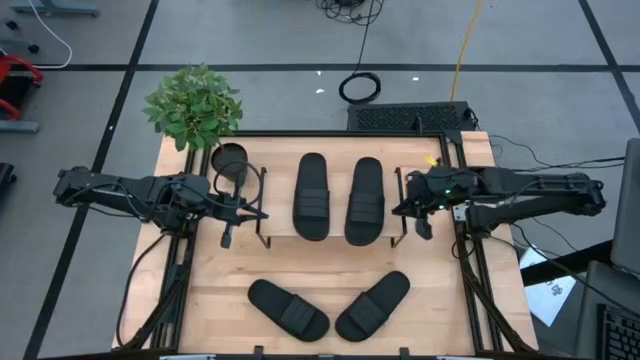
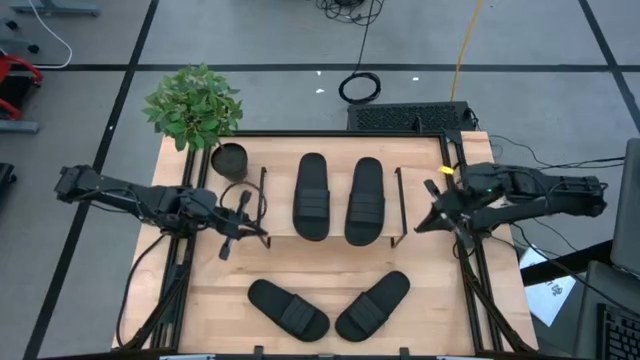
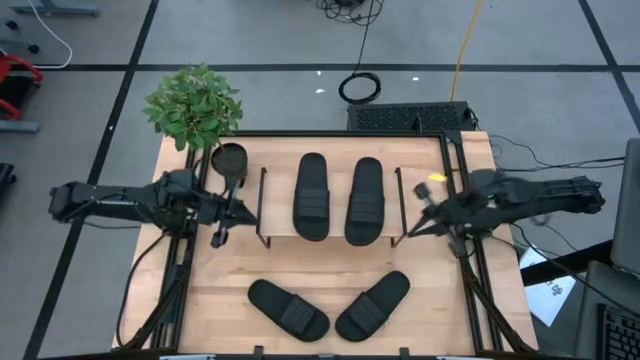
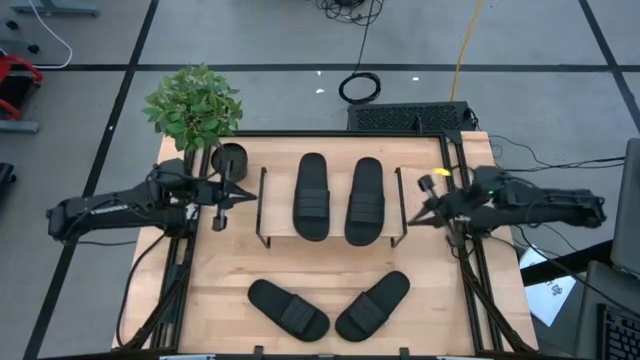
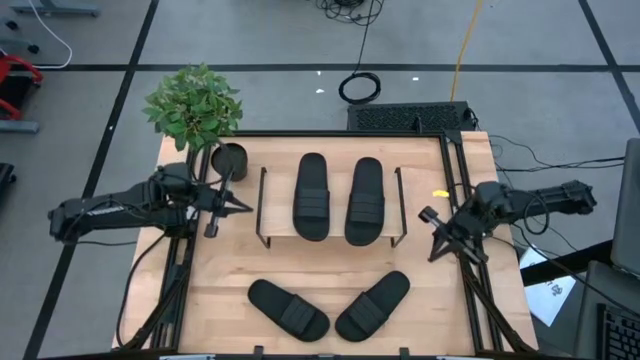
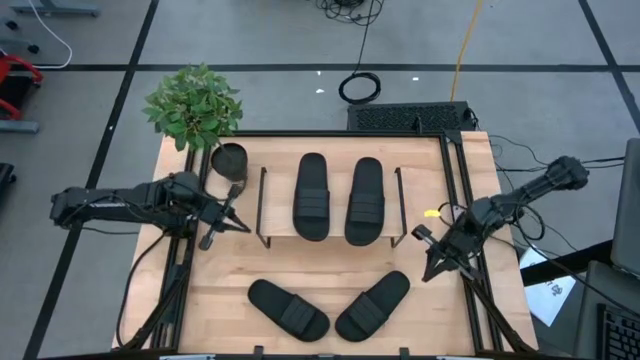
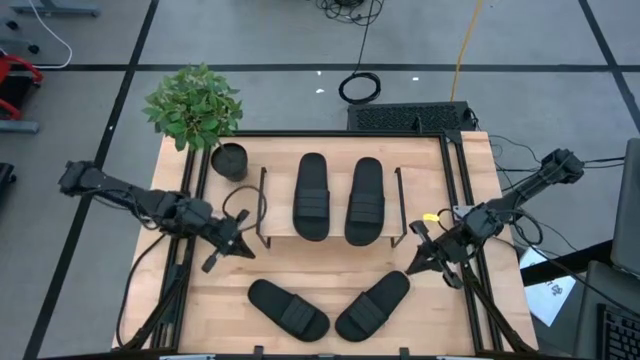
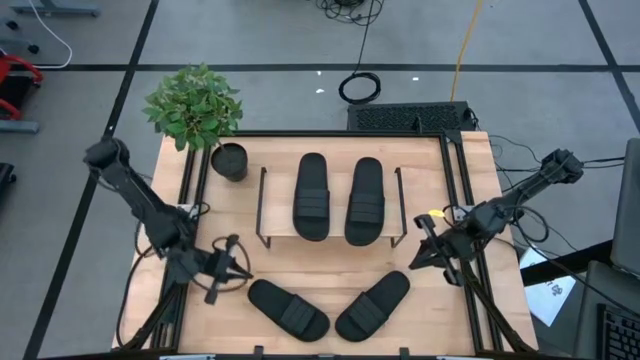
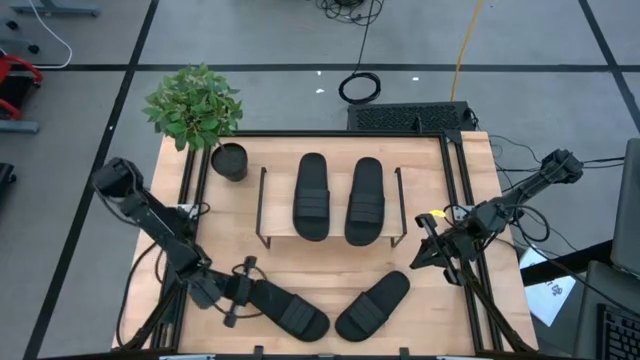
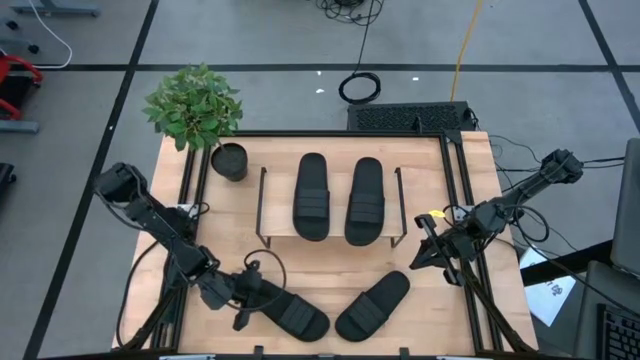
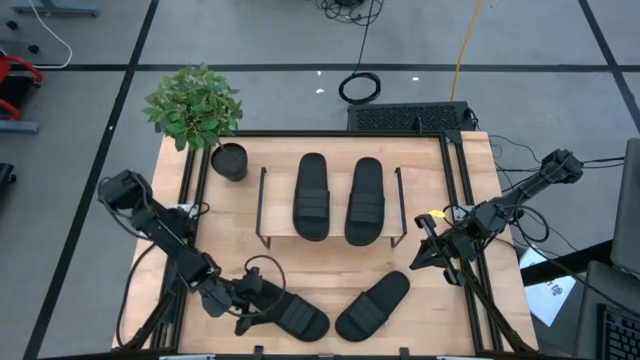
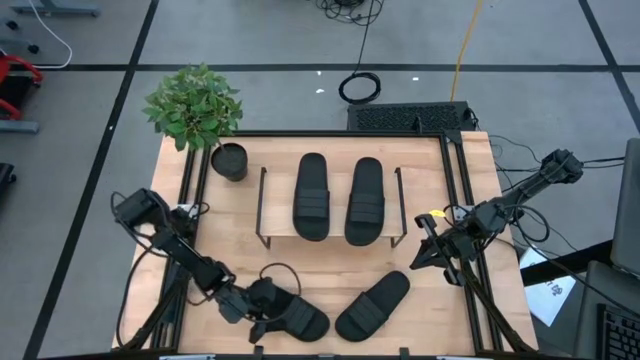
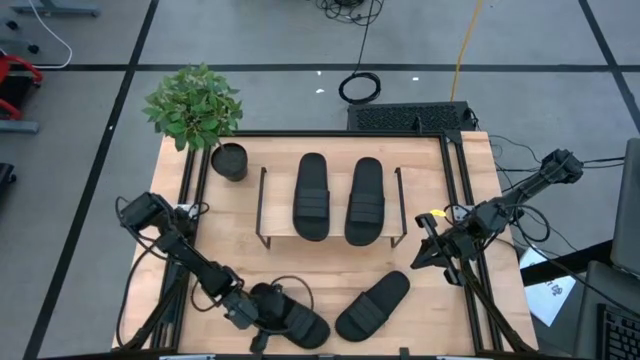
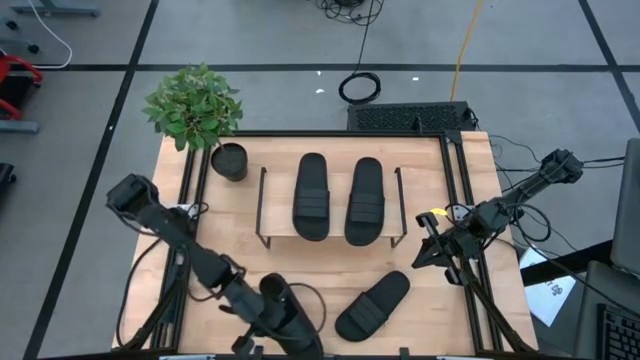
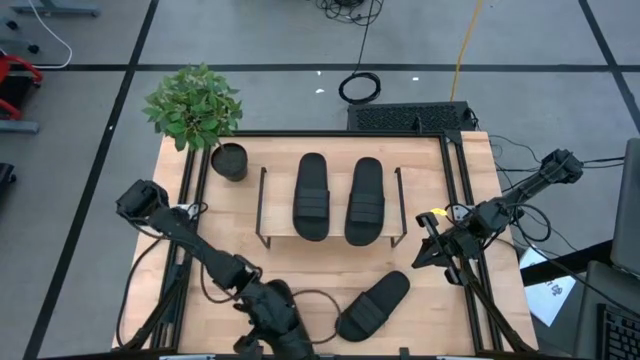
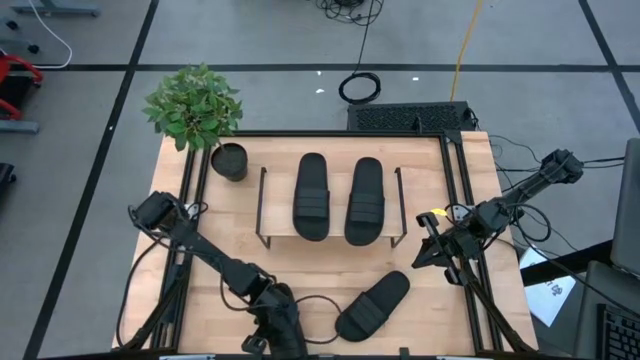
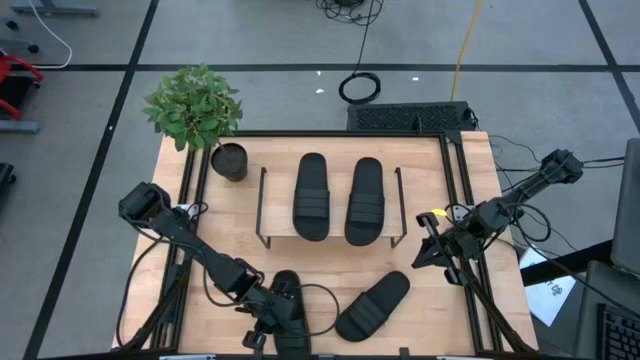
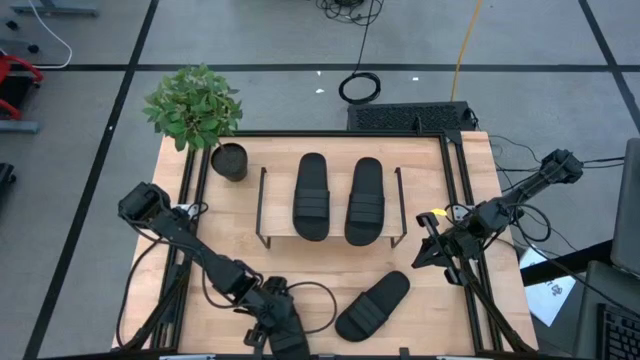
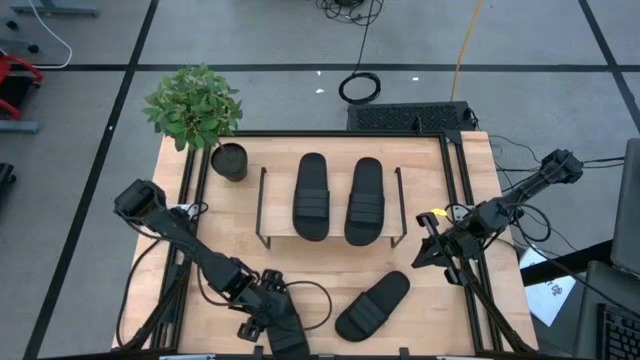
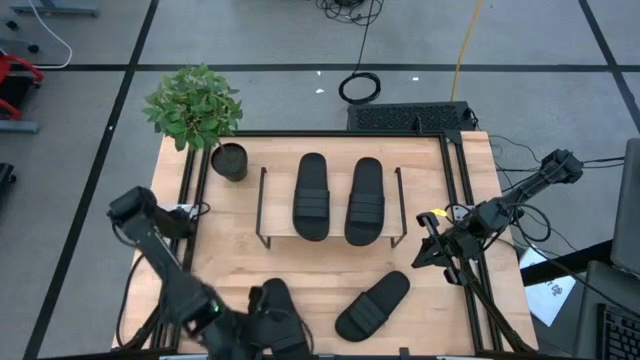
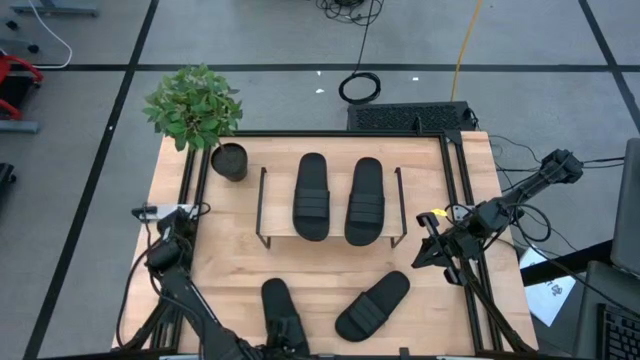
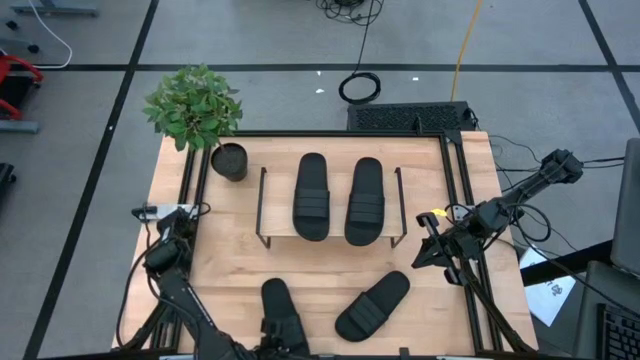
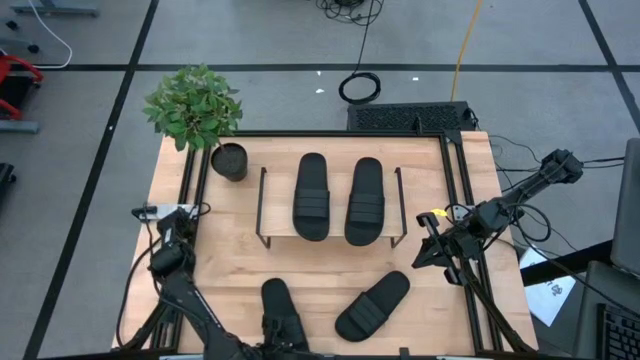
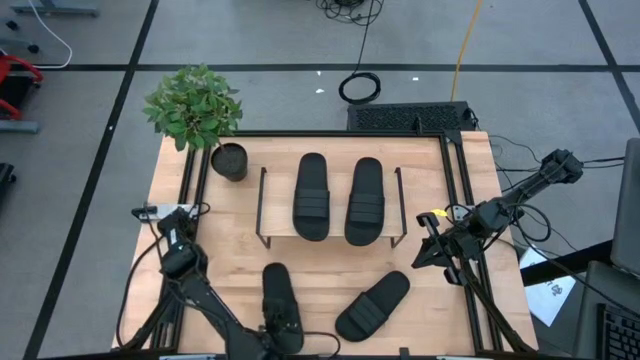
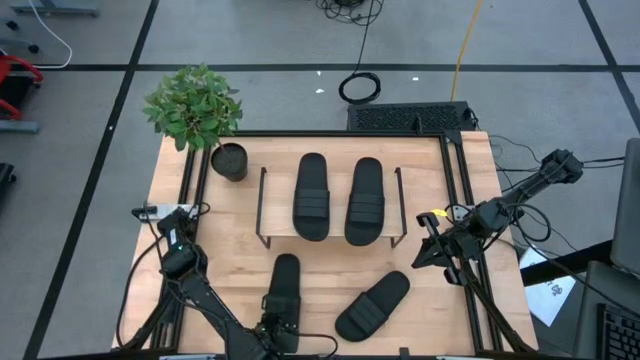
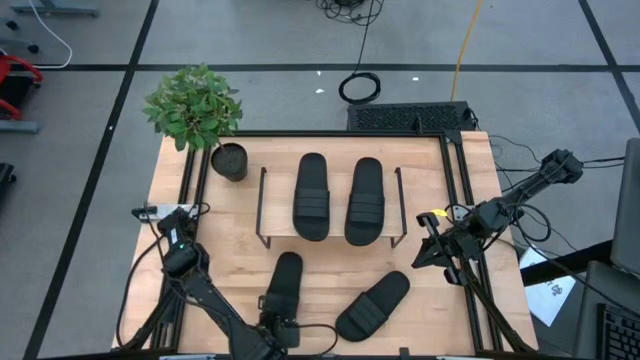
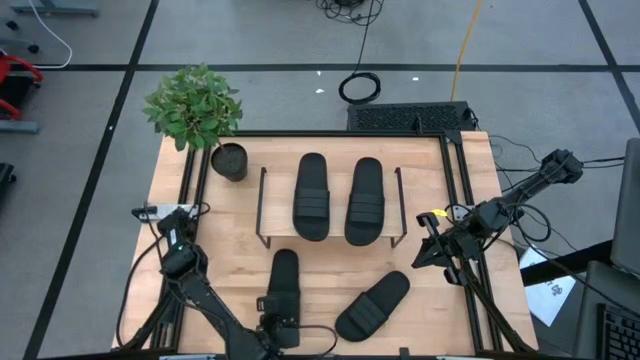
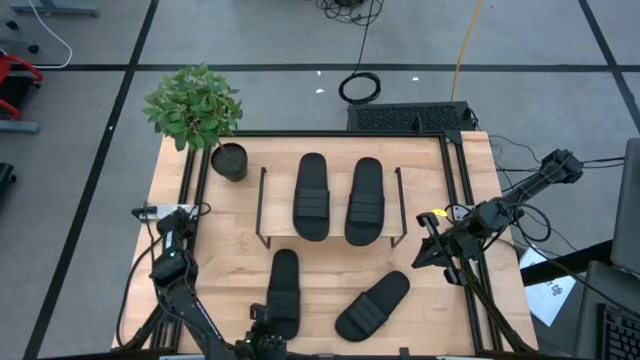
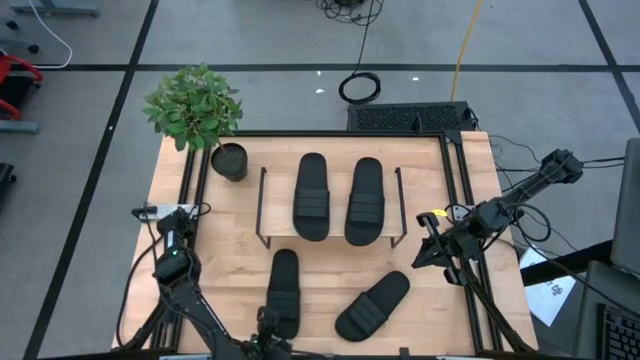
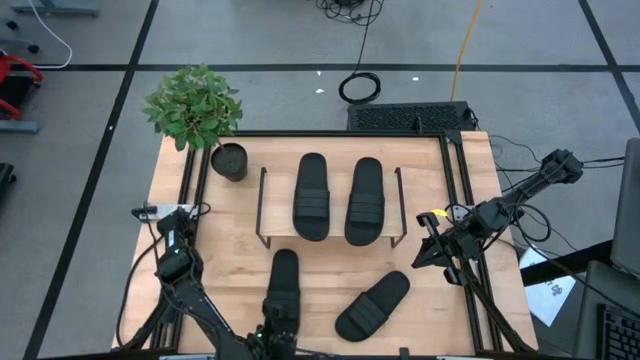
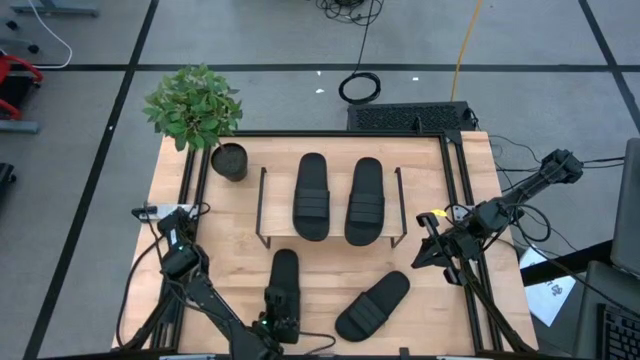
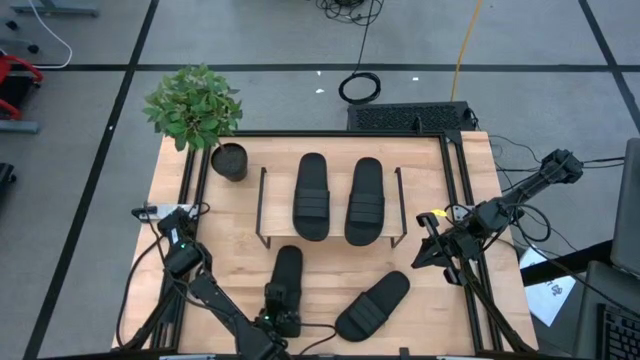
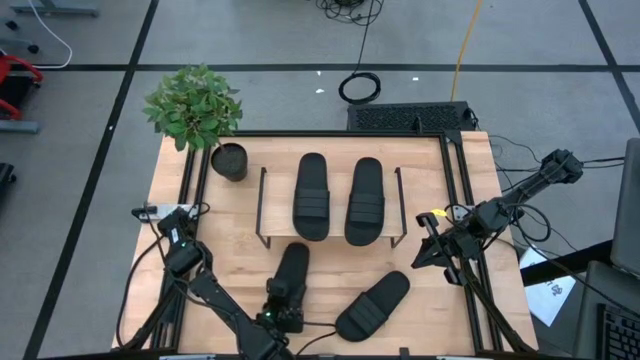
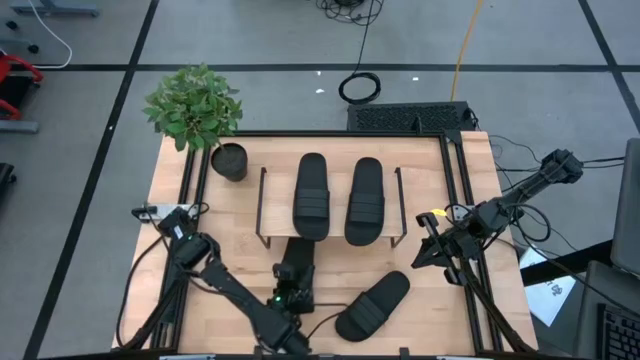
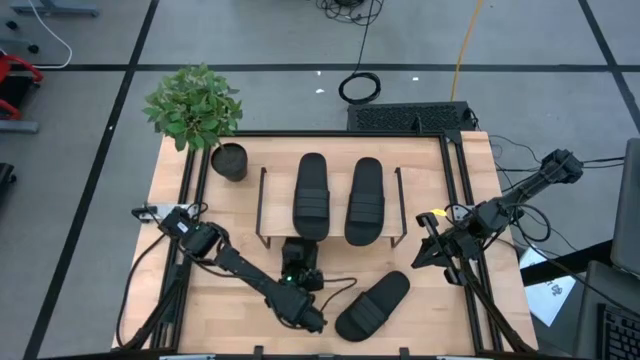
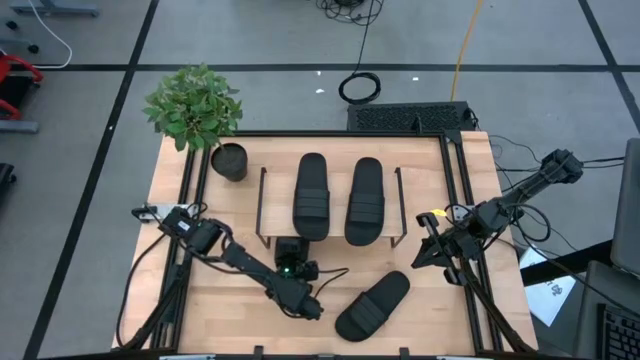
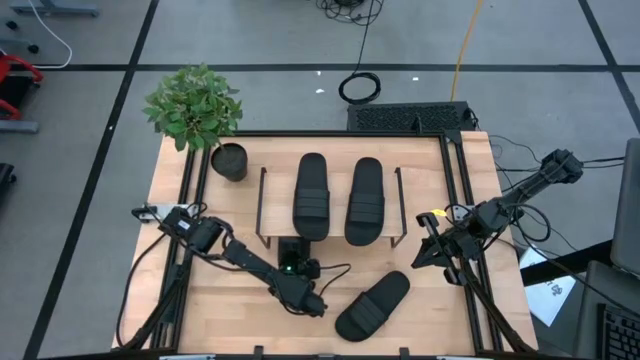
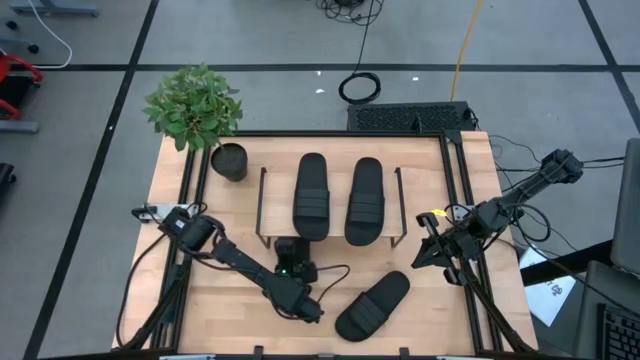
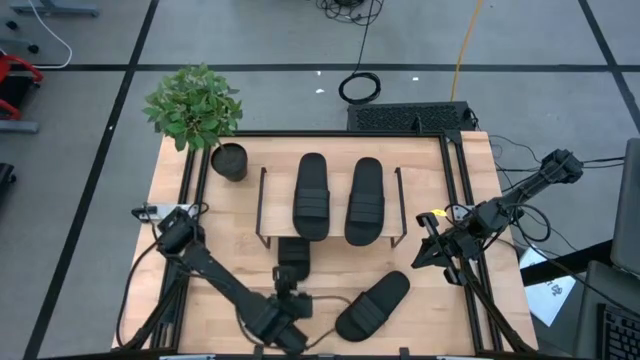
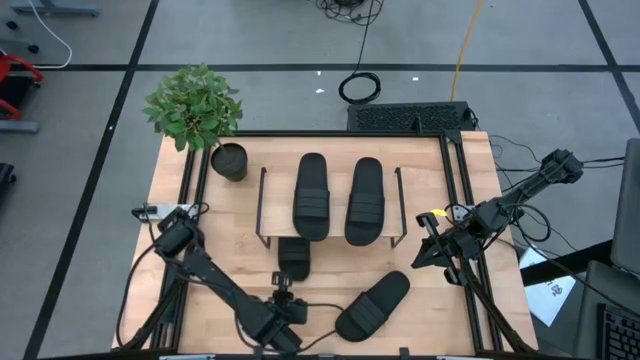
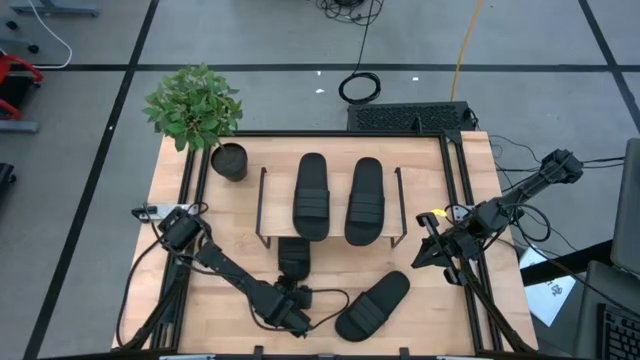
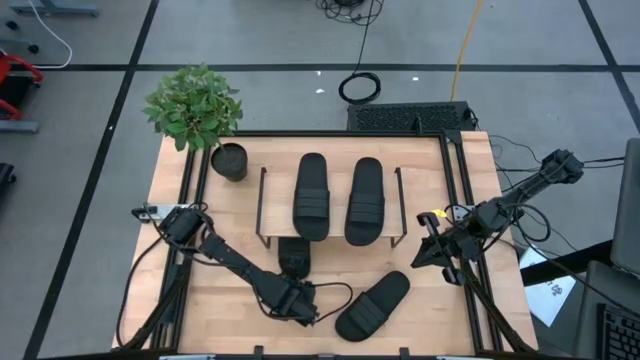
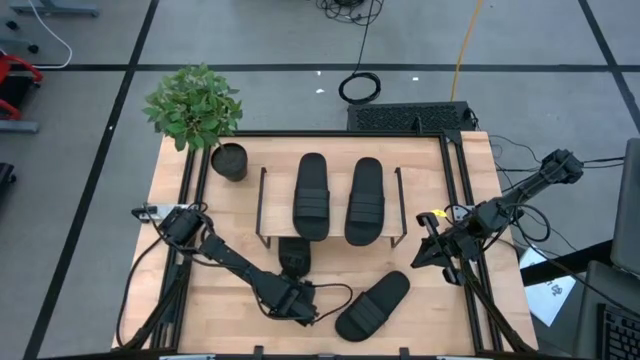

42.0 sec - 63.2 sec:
Task: Pick and place slides into the shelf
Put the black slide under the shelf
